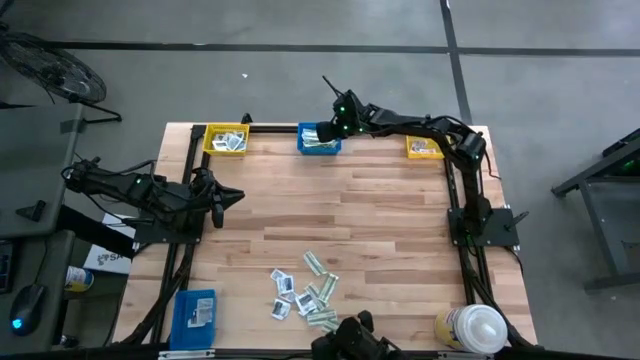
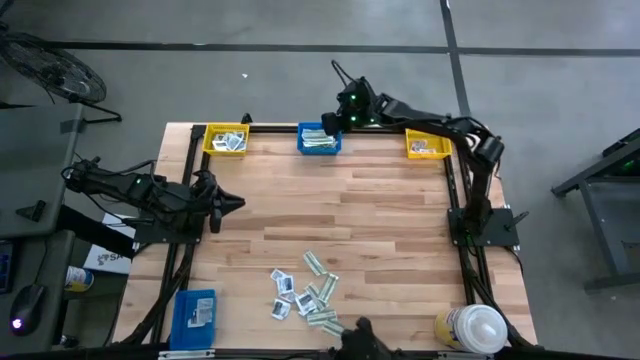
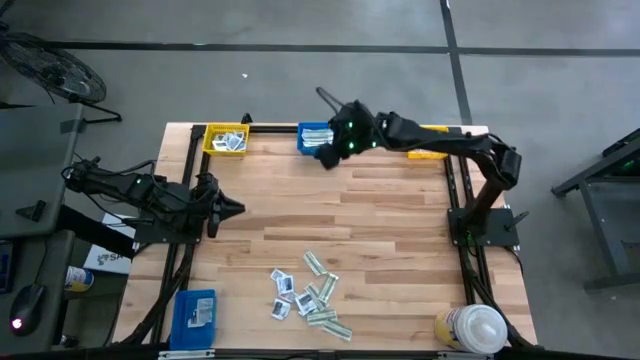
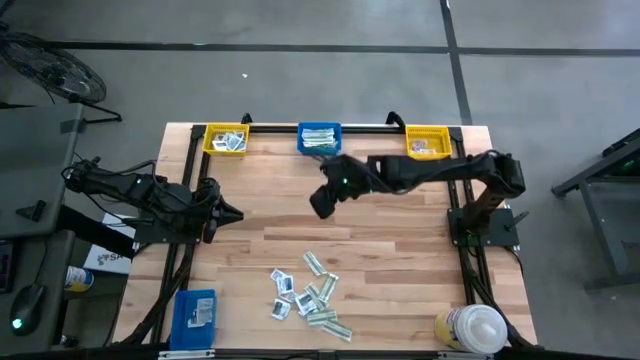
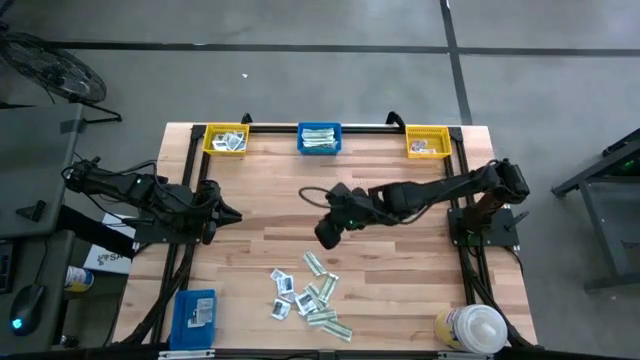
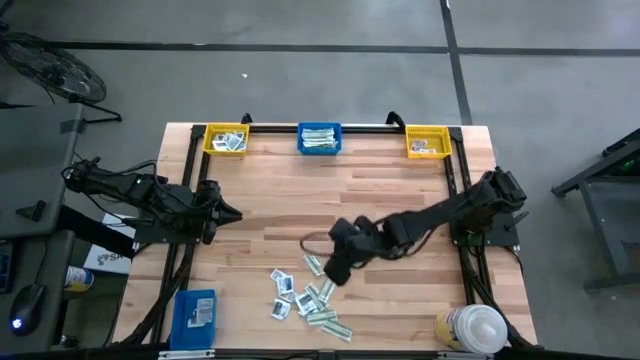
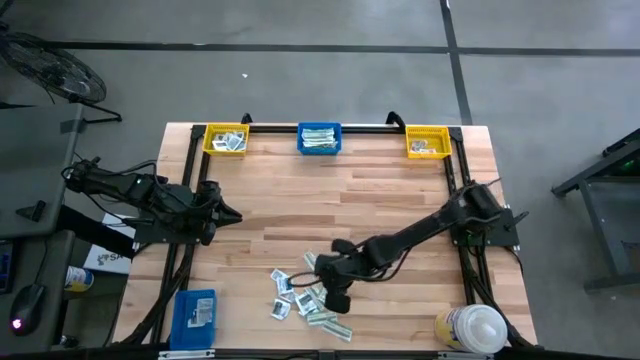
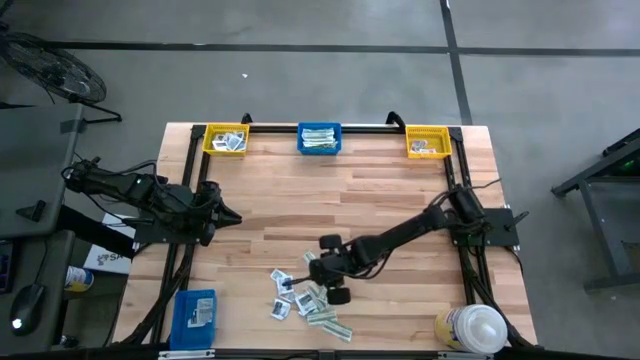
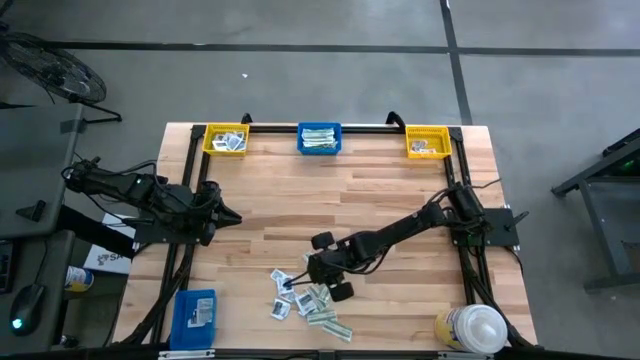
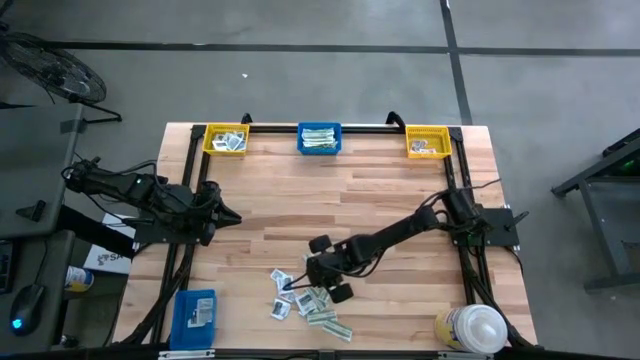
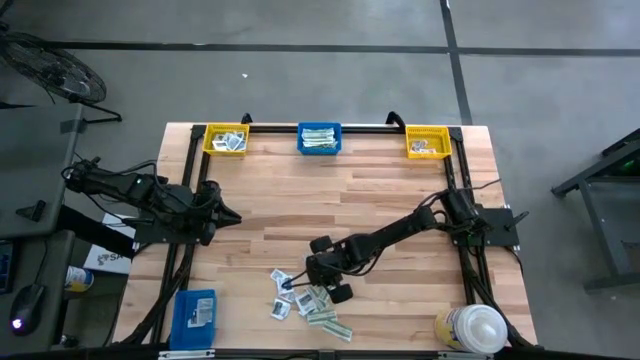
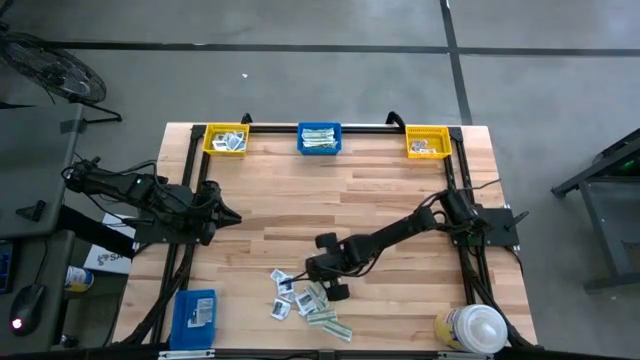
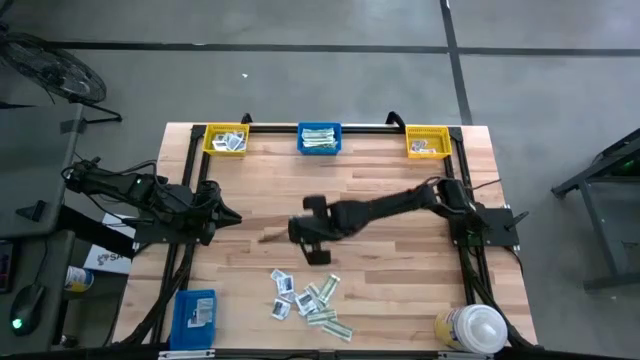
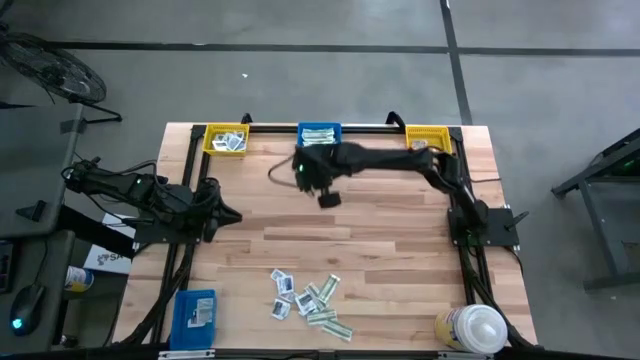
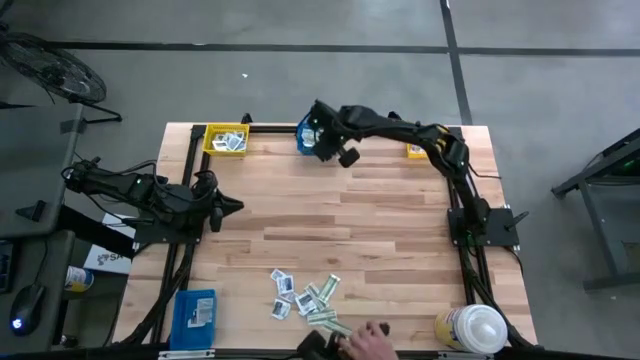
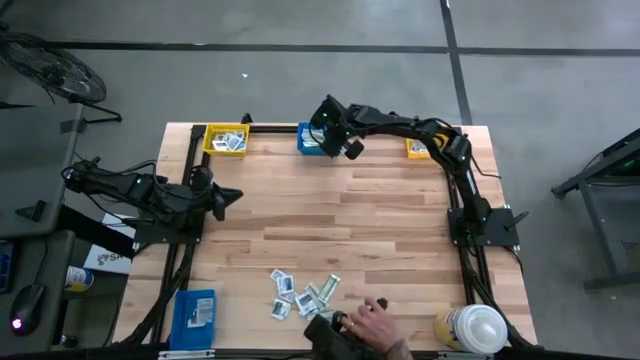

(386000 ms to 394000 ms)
Task: Pick & Place First Aid Supplies
Put the green bandage pack into the top blue bin

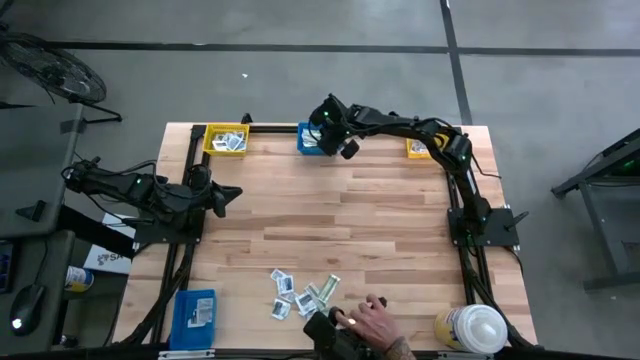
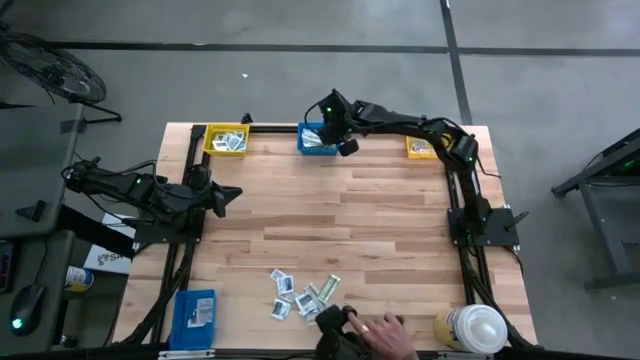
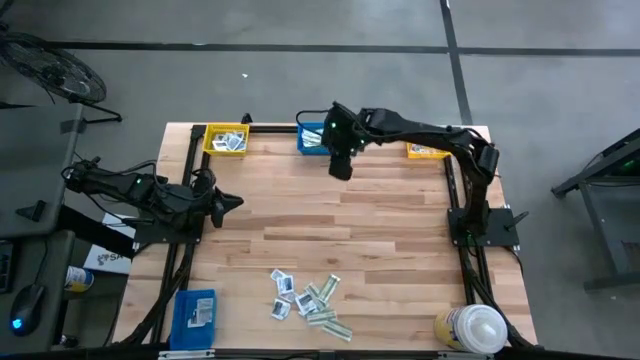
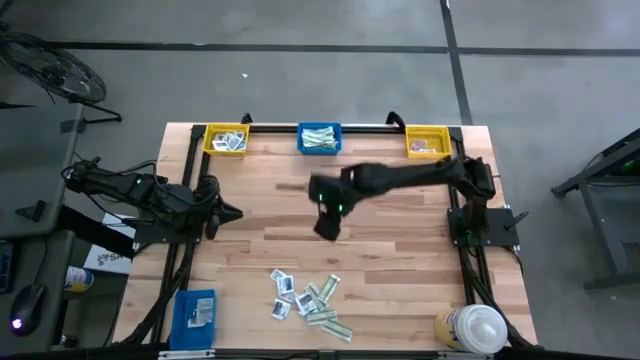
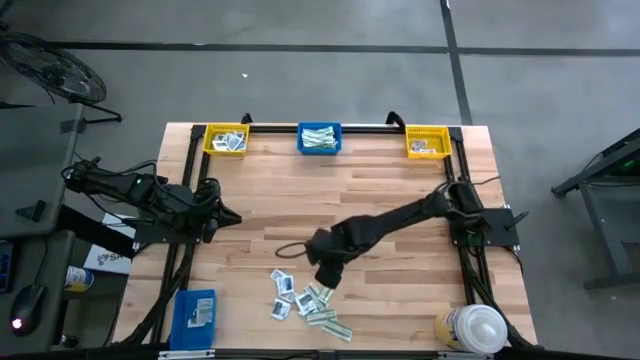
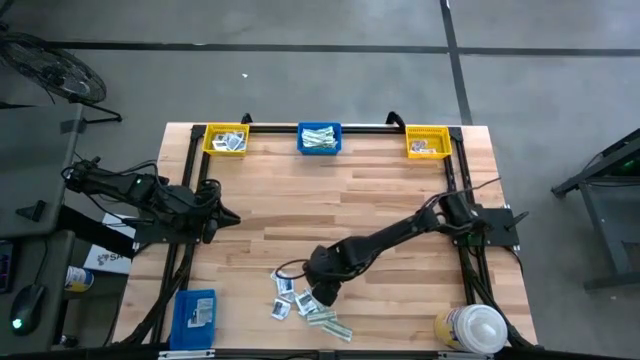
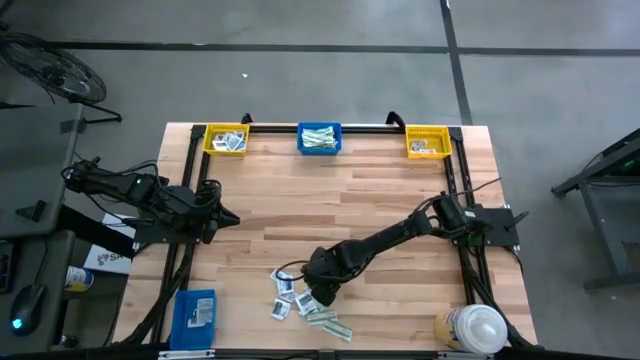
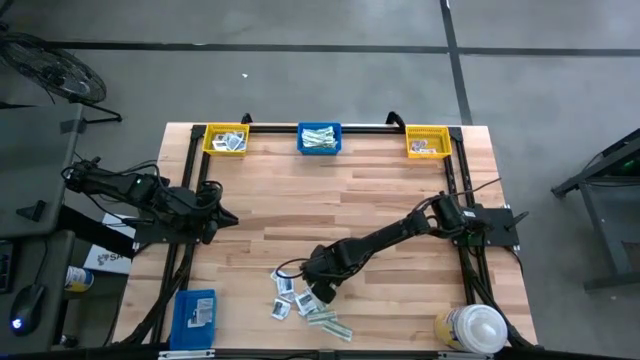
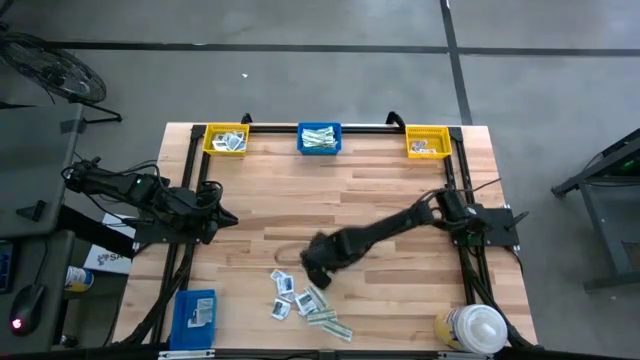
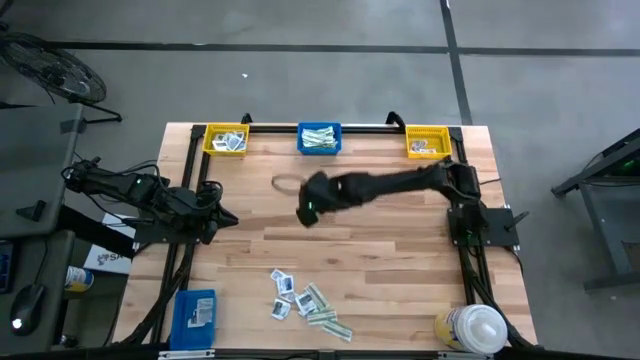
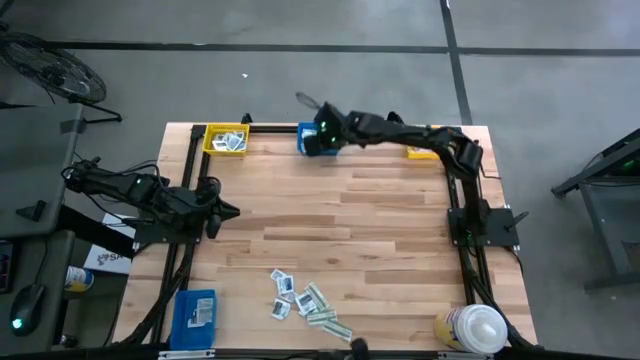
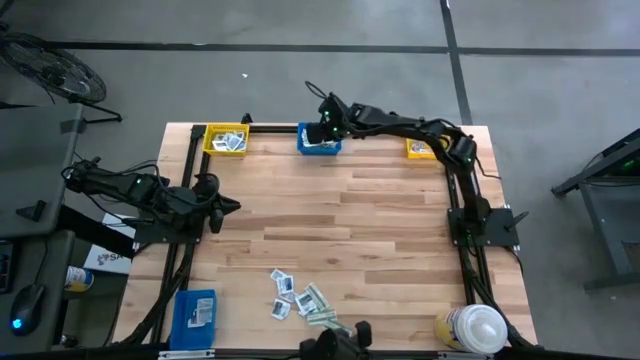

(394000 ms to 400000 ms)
Put the green bandage pack into the top blue bin

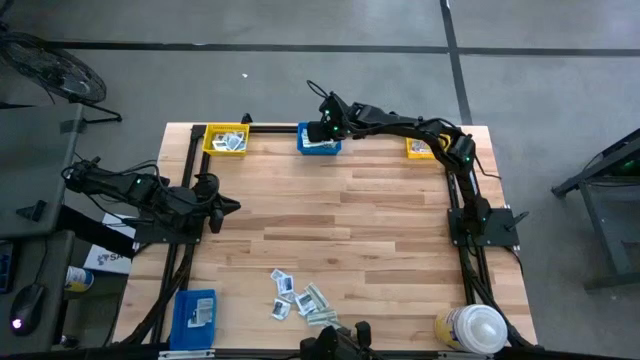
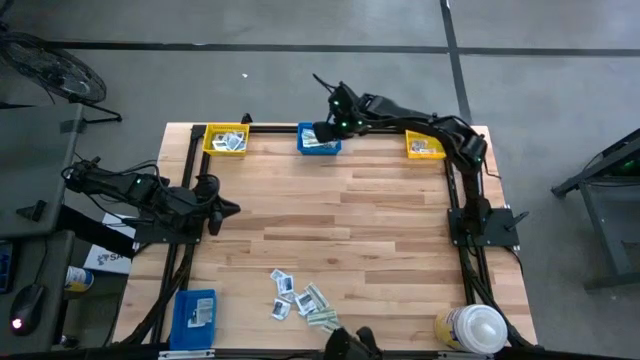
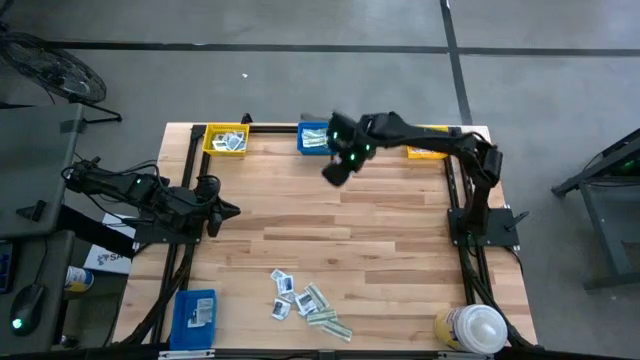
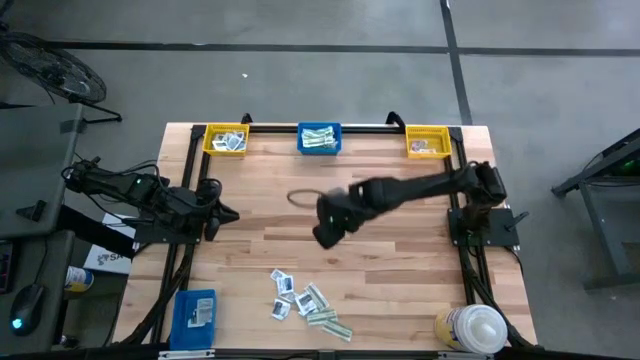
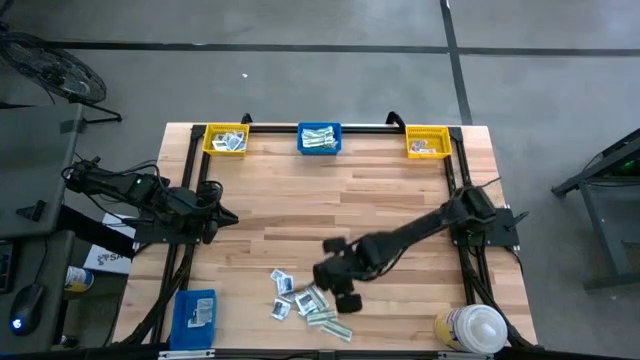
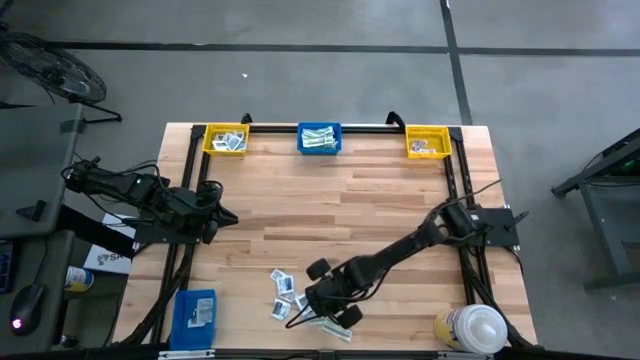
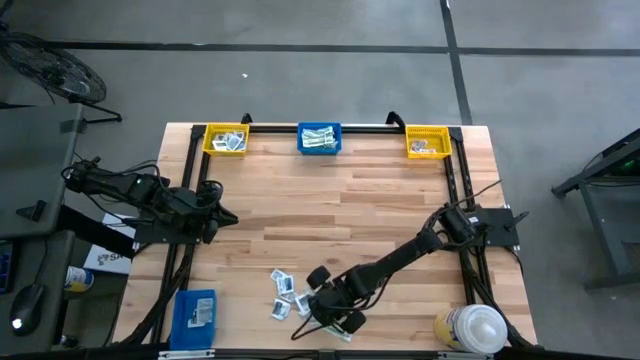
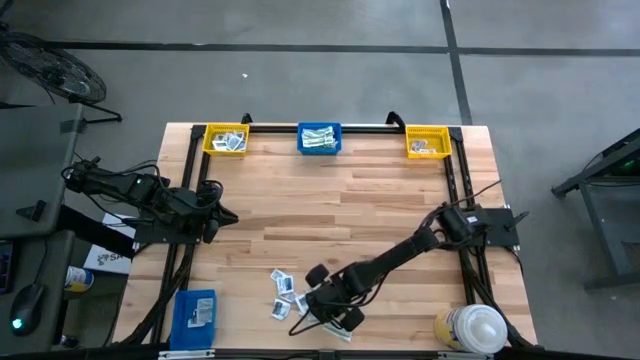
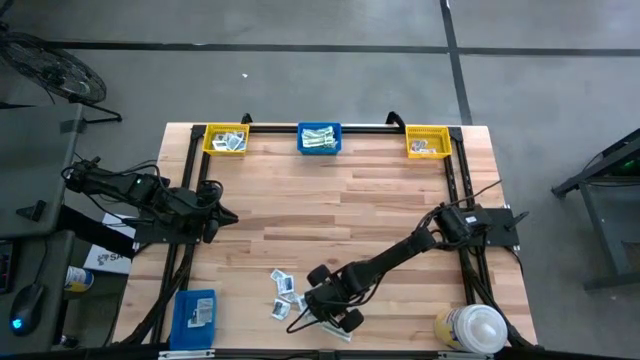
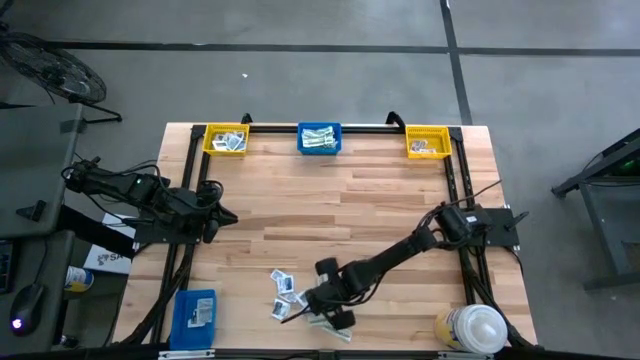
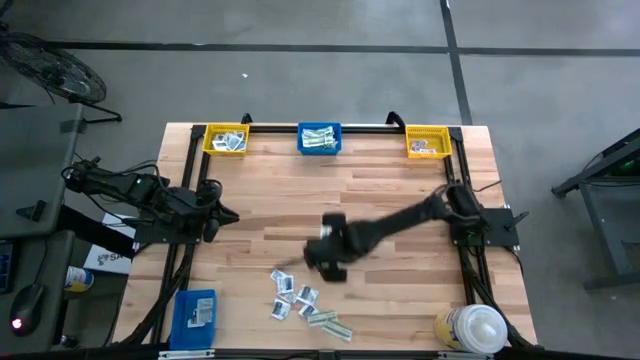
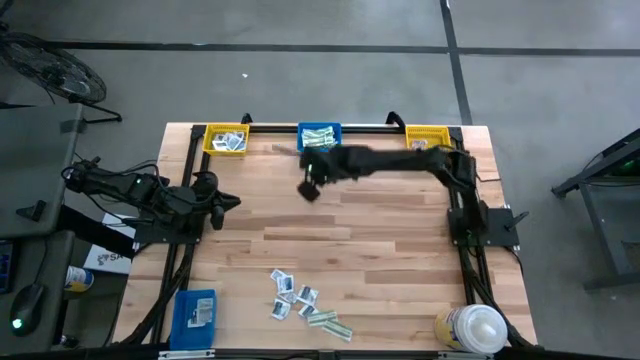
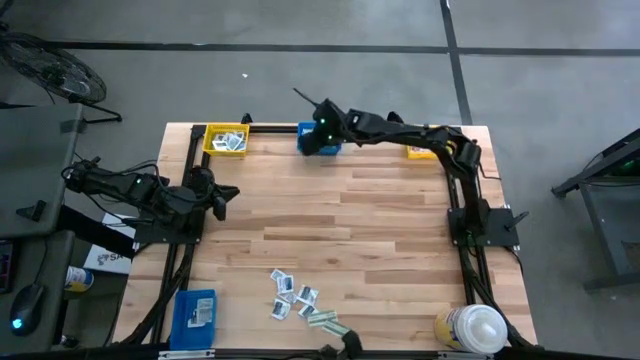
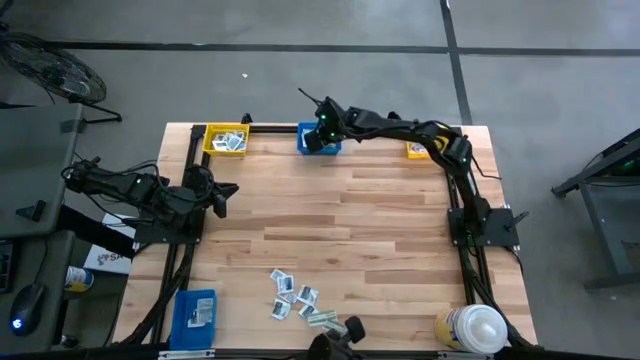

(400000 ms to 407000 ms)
Put the green bandage pack into the top blue bin

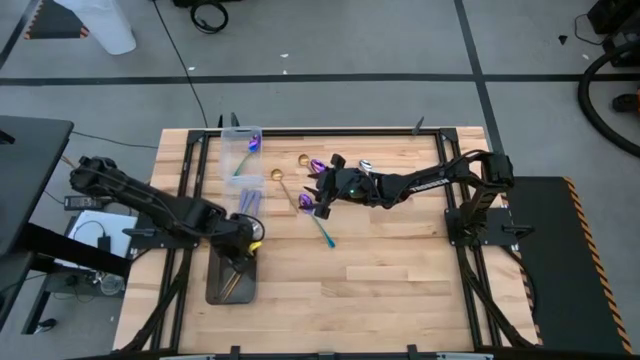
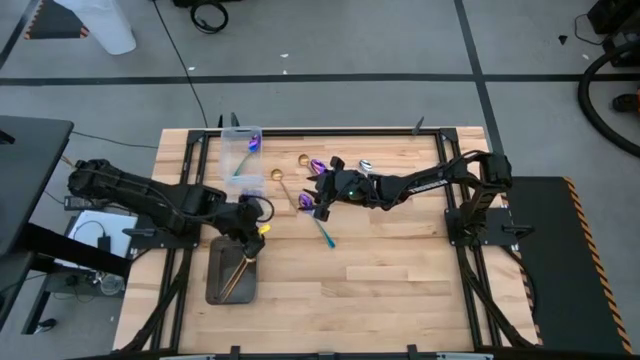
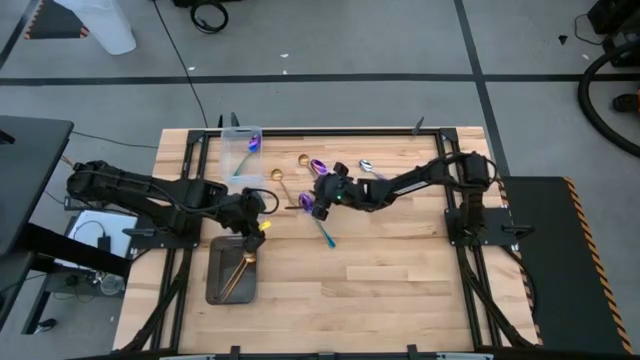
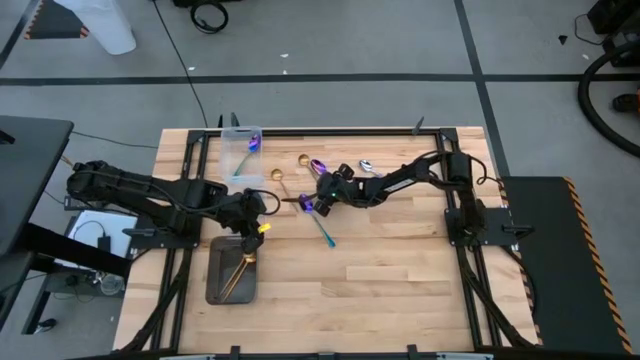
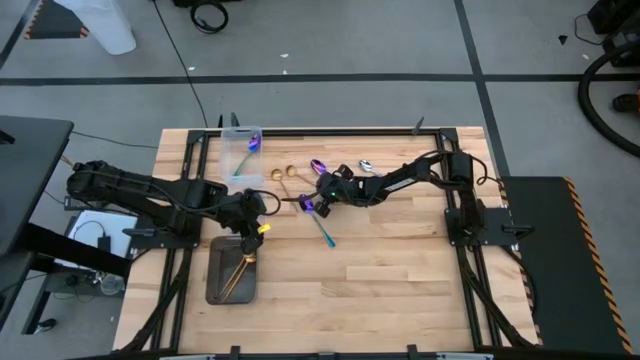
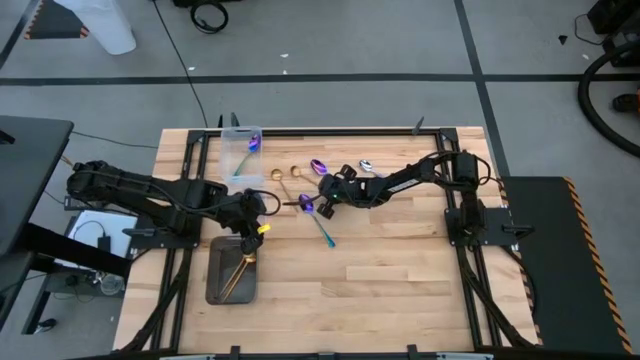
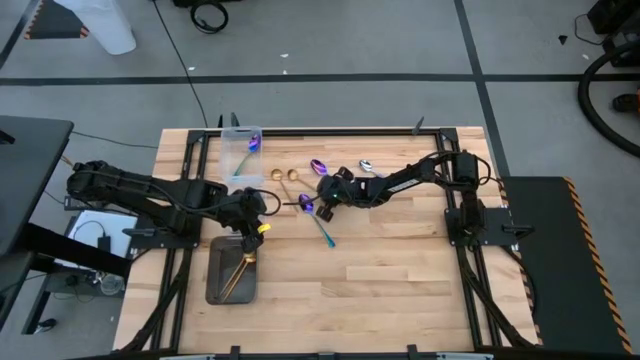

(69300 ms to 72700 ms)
Task: Sort silverware by color (type)
Put the gold spoon into the black bin
